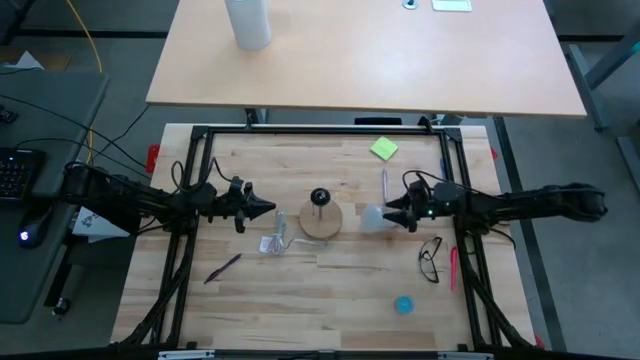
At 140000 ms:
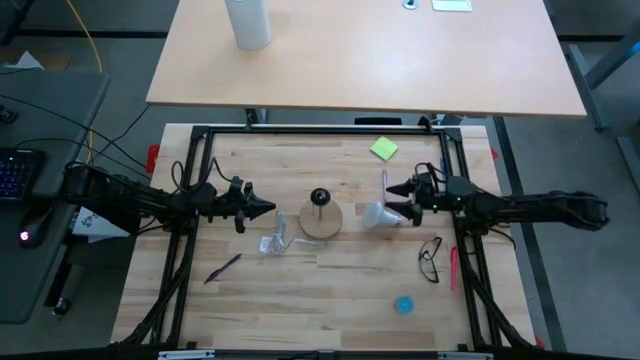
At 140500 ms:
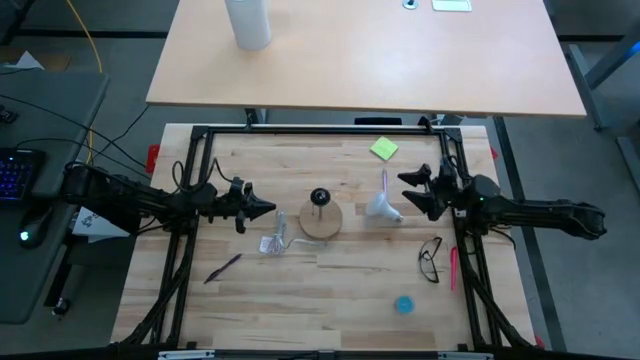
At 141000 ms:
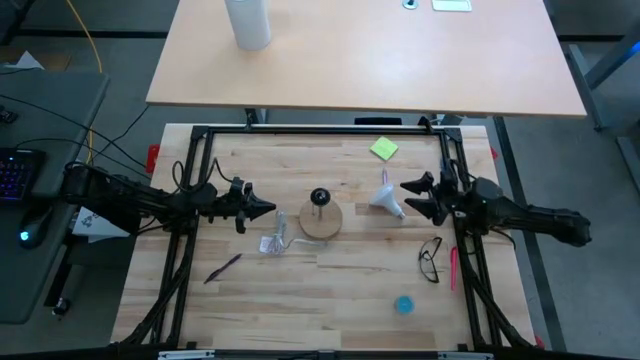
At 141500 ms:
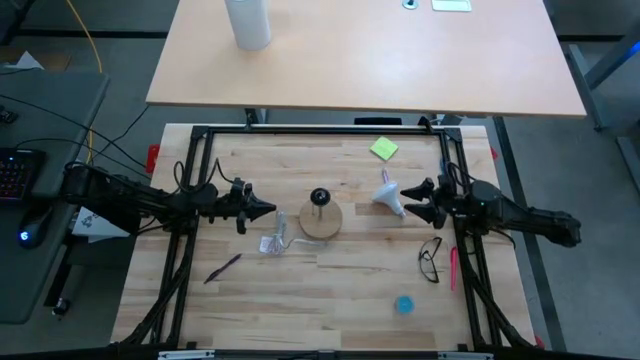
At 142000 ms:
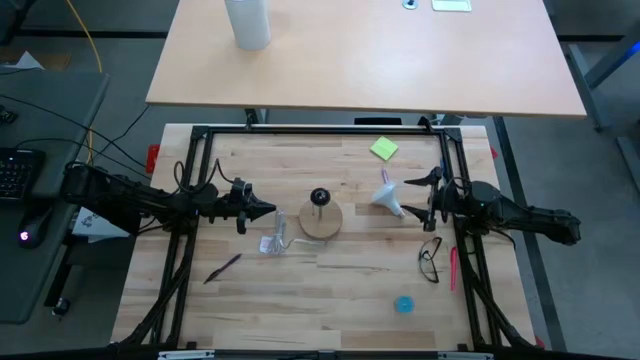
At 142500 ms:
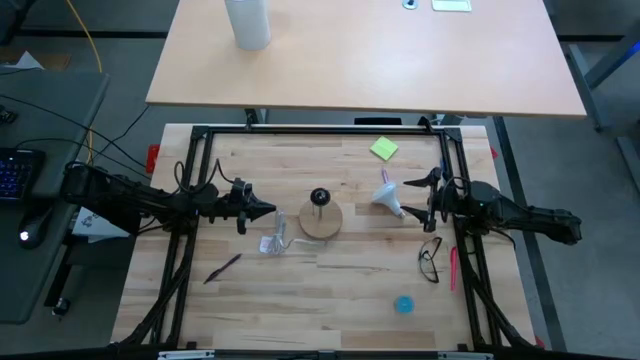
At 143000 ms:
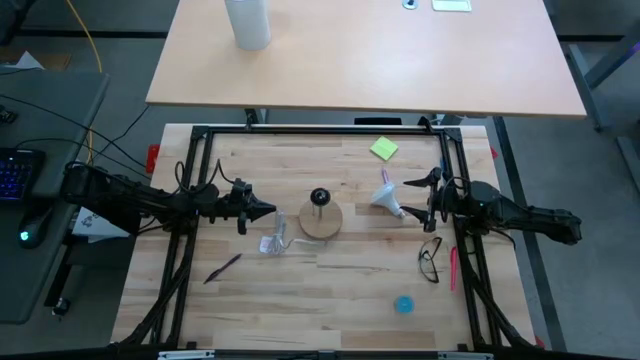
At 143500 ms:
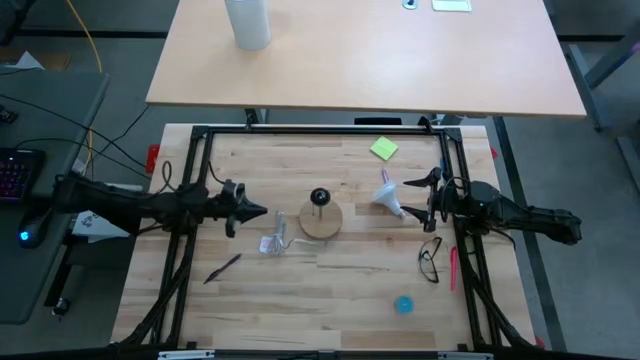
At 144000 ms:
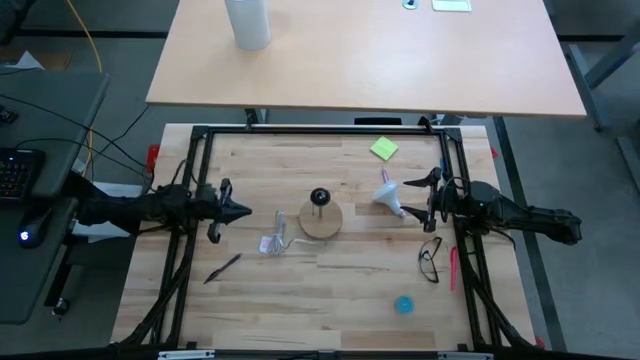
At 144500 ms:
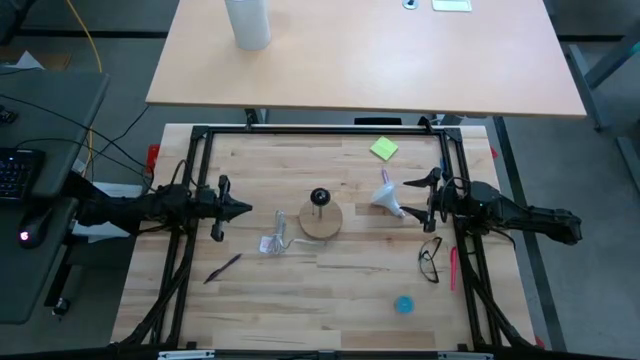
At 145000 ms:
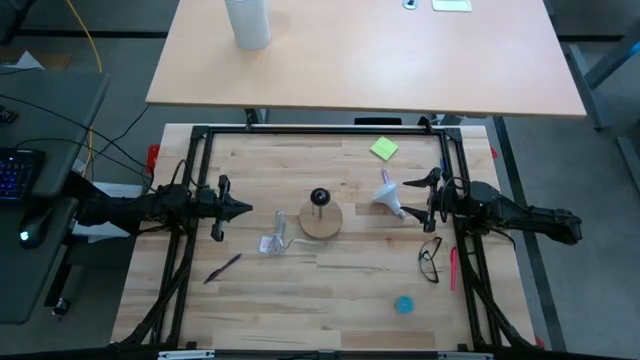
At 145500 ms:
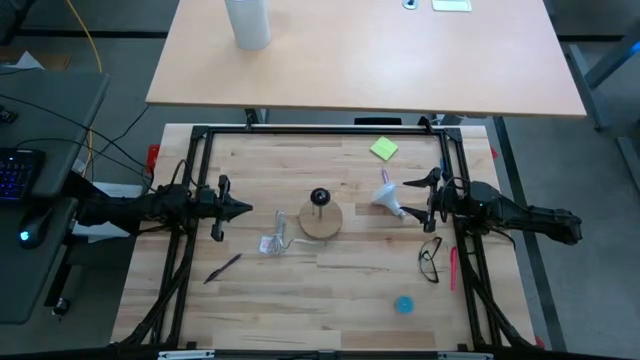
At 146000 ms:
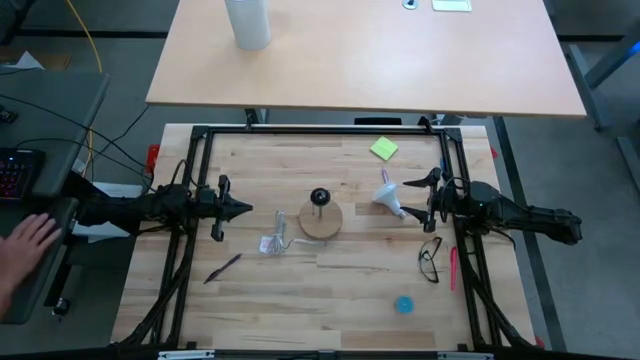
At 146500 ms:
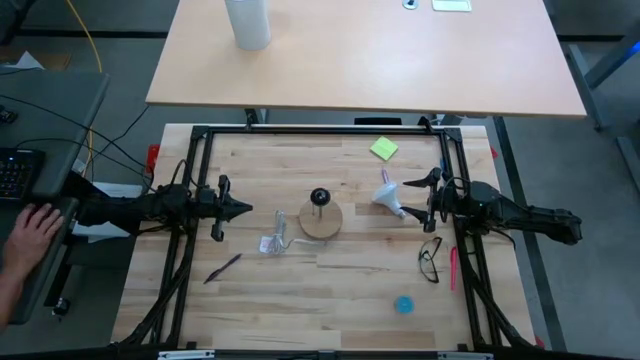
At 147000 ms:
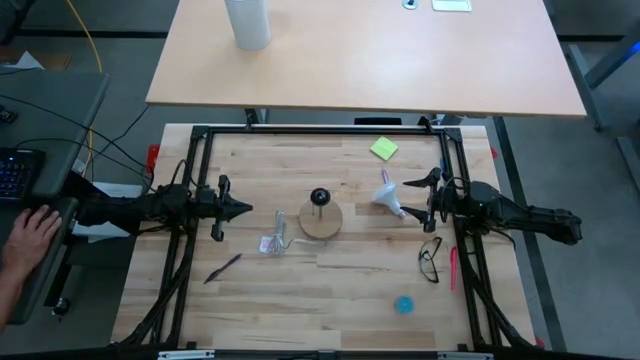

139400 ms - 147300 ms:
Task: Screw lightbulb
Return to Home Position

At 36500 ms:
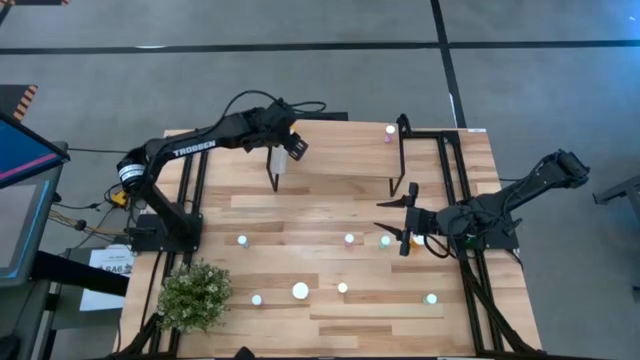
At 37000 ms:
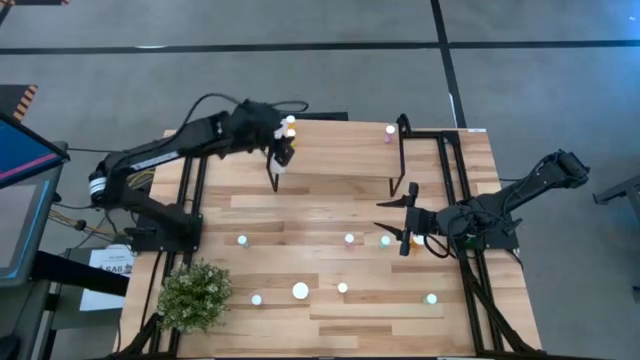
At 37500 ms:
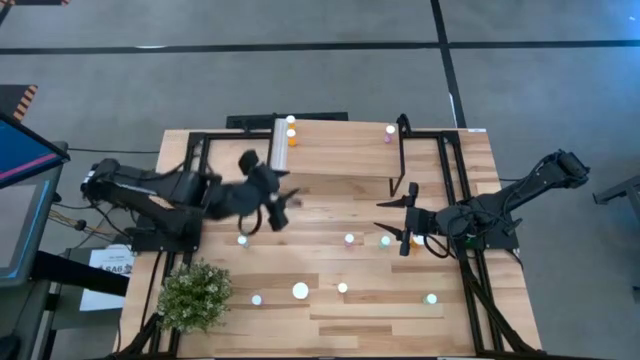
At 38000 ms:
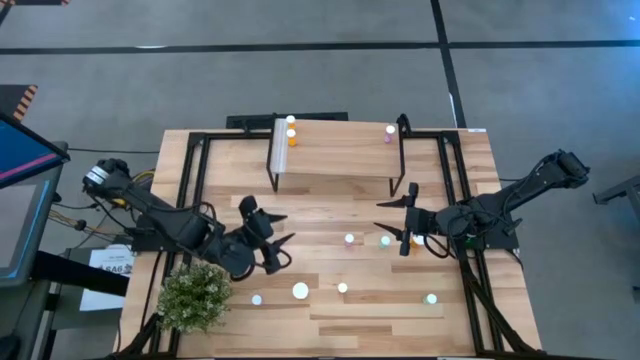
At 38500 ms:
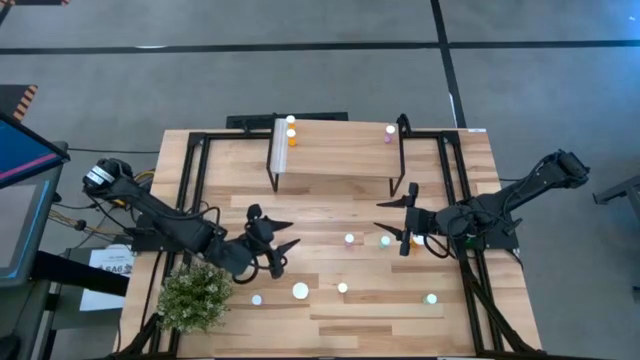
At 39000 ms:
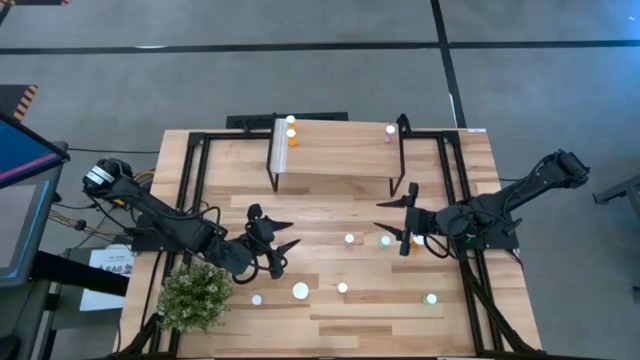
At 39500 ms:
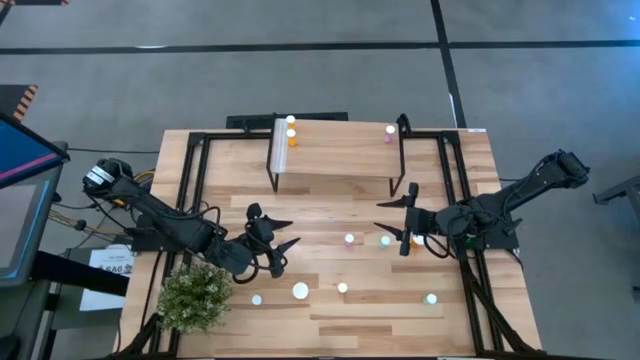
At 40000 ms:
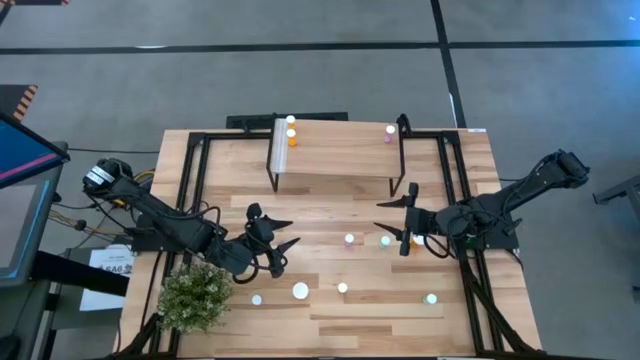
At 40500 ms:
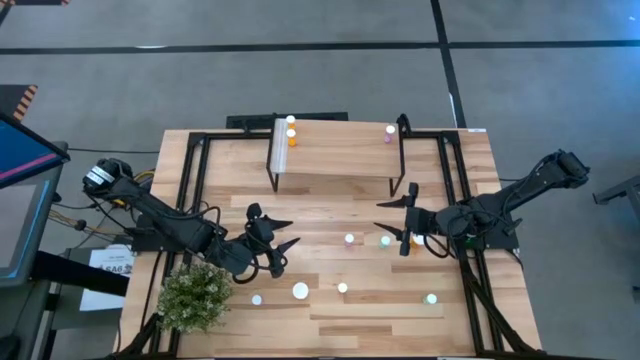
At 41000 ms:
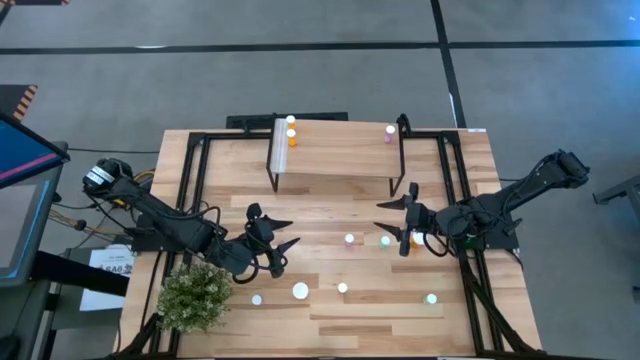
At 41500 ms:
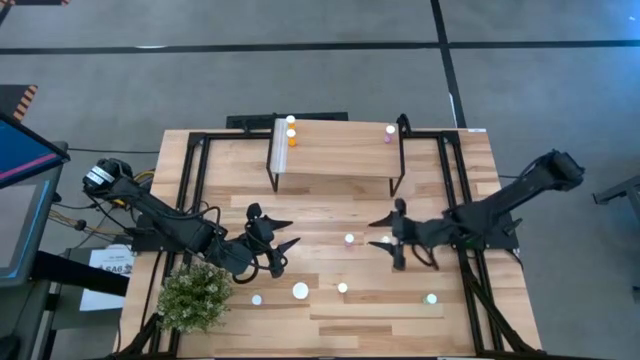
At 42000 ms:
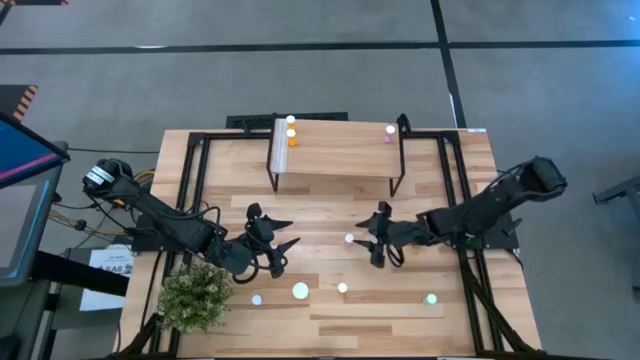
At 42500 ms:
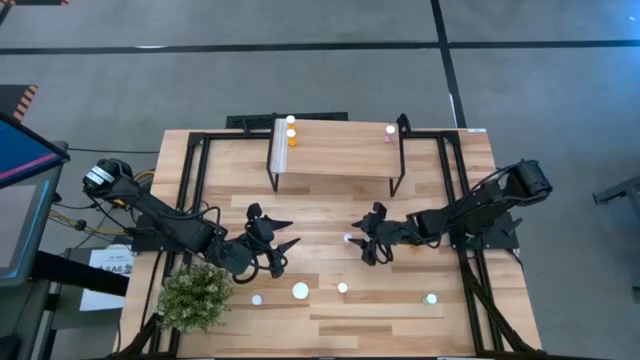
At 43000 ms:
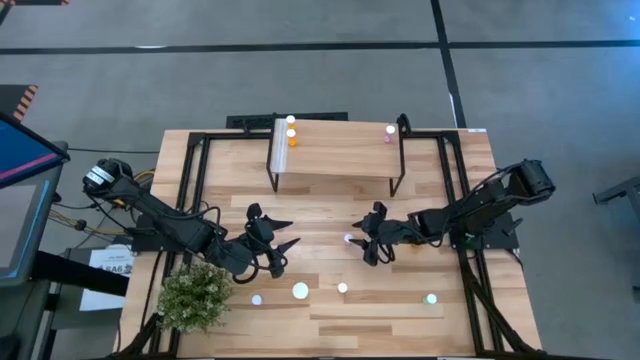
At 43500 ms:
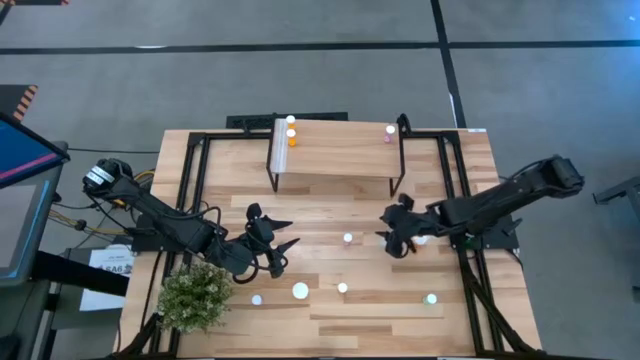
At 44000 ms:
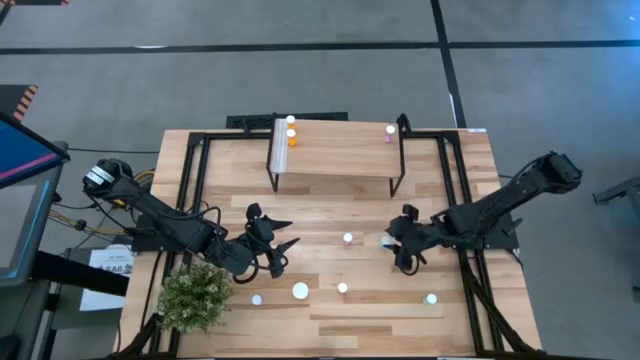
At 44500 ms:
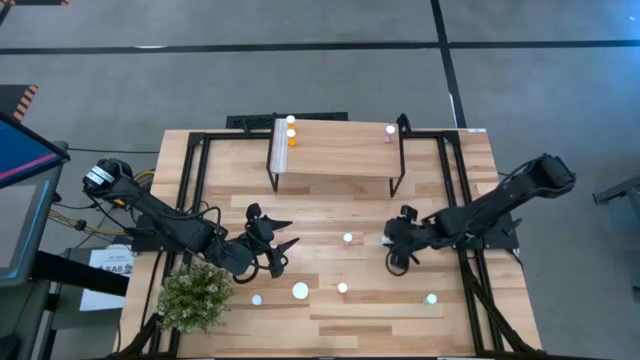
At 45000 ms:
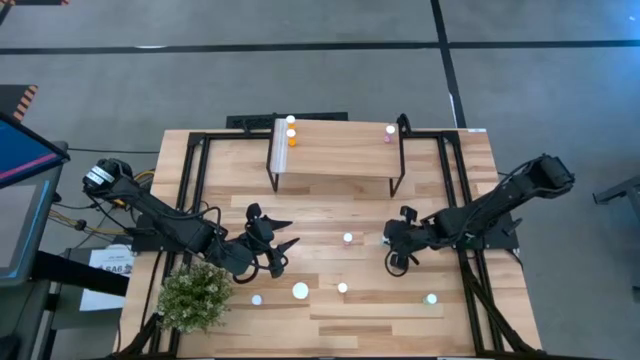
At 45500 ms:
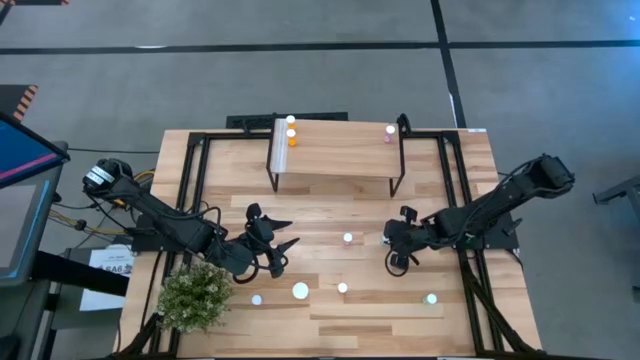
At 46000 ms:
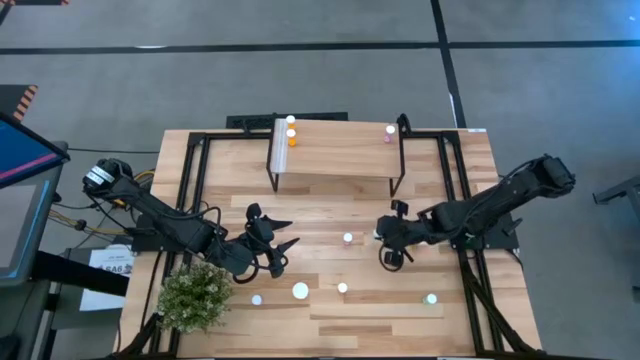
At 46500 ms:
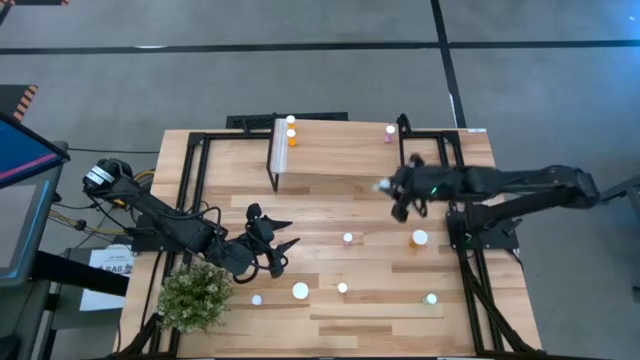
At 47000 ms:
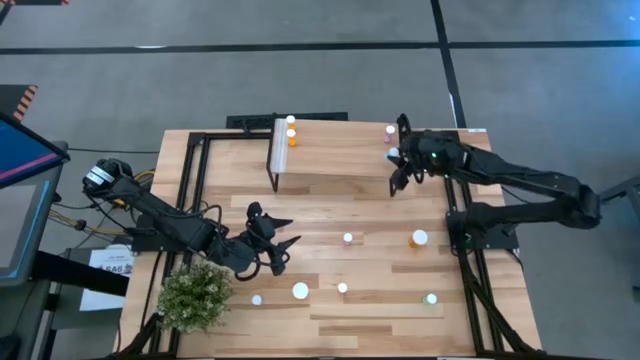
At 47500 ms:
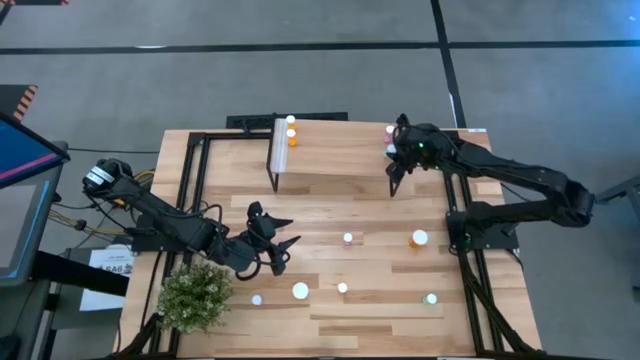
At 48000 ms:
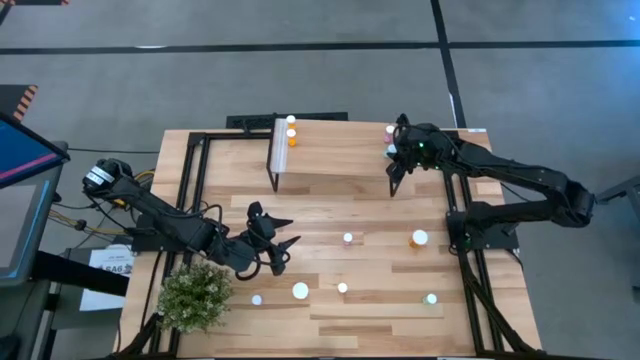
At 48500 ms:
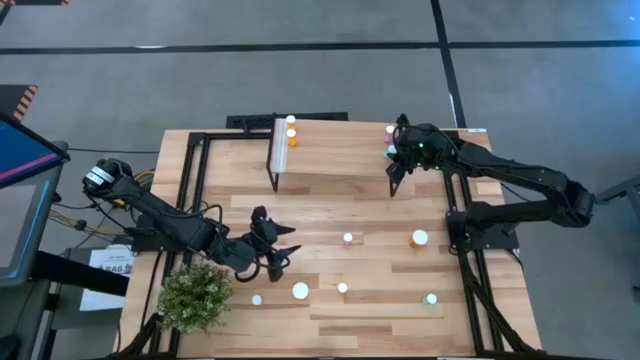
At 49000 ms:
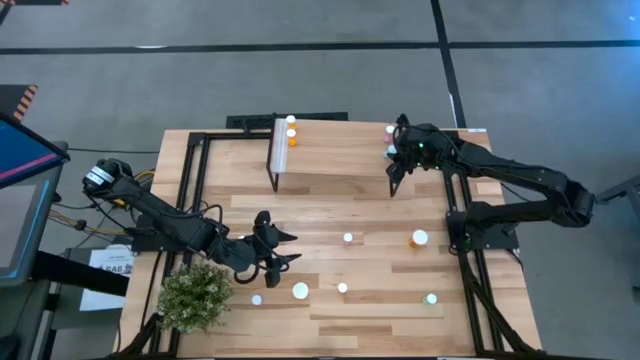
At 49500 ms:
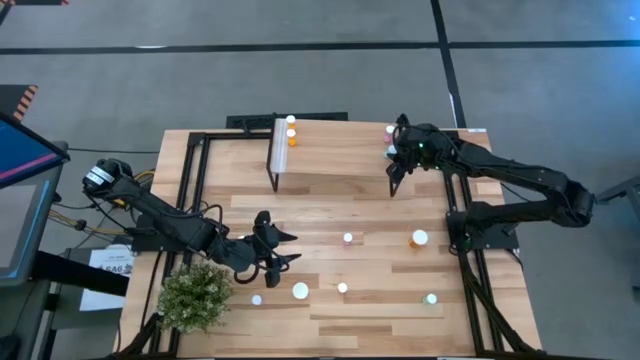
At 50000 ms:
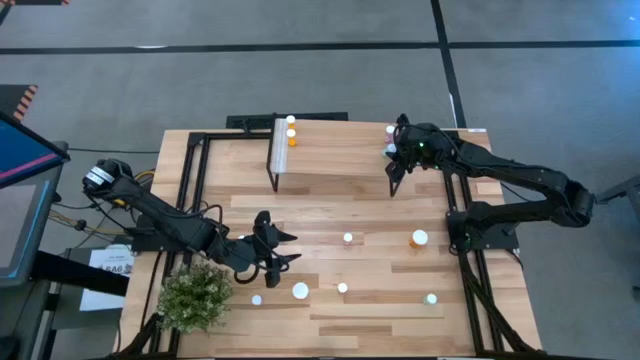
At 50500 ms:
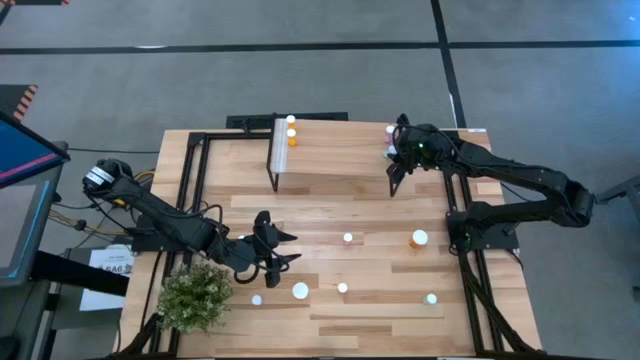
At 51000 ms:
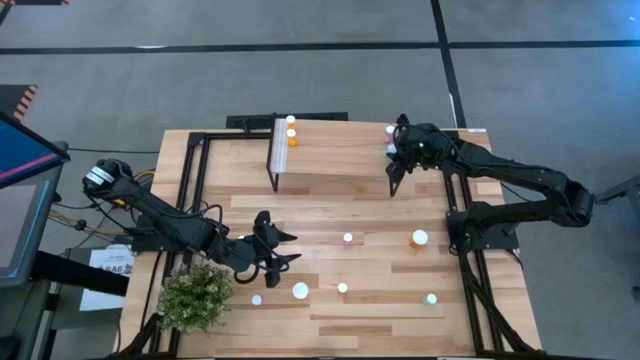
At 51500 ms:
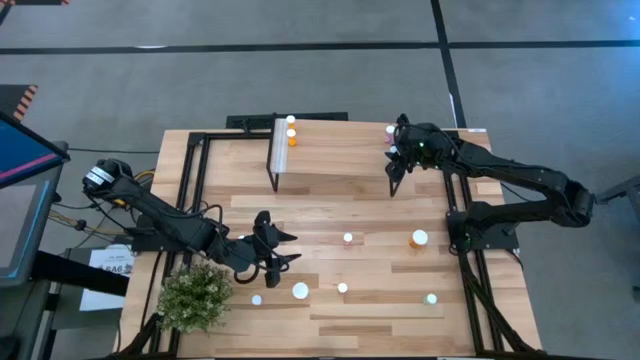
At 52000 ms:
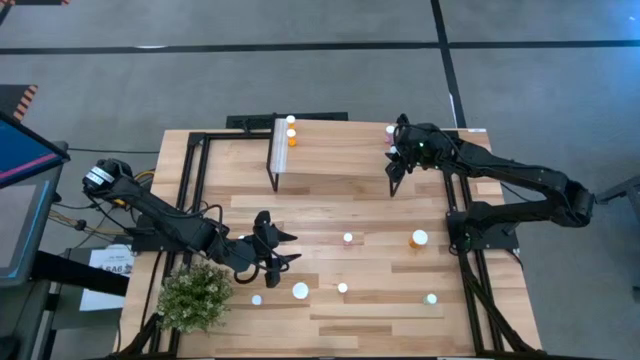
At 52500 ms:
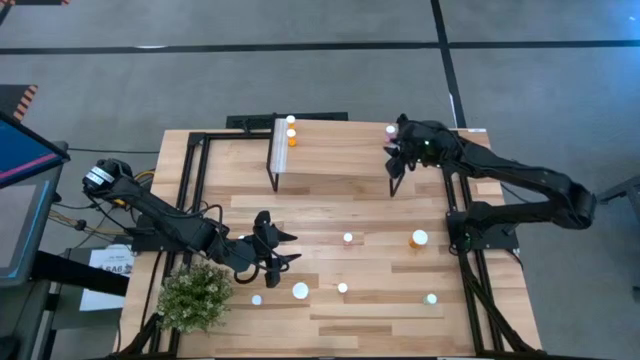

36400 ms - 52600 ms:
Task: Pick and place medicine bottles onto shelf by color
Put the top small blue pill bottle on the shelf
